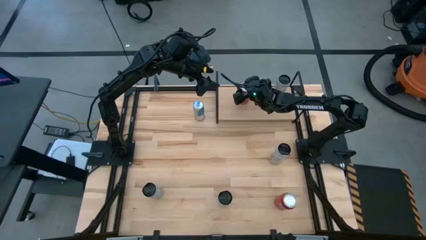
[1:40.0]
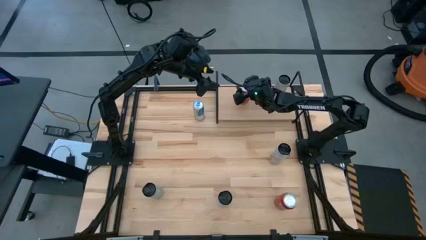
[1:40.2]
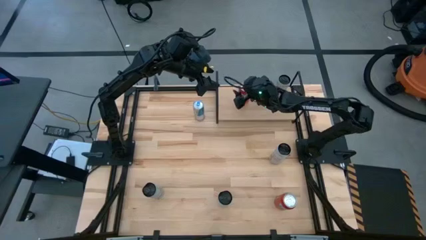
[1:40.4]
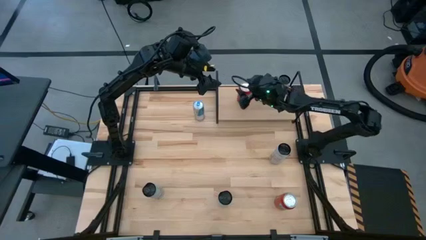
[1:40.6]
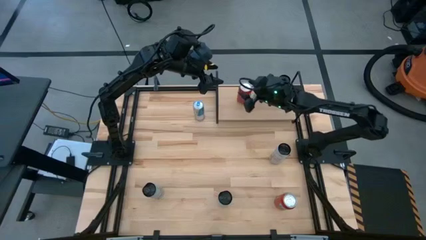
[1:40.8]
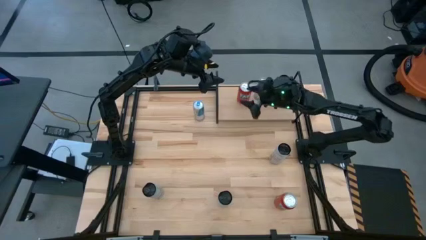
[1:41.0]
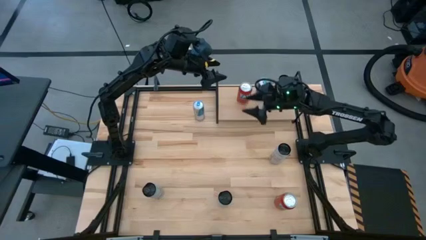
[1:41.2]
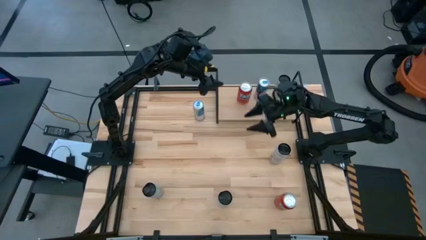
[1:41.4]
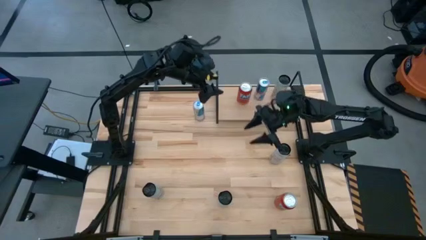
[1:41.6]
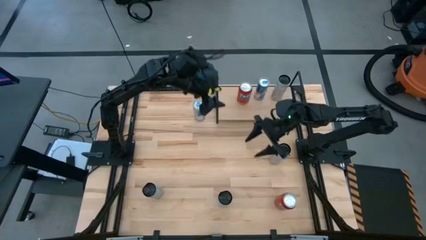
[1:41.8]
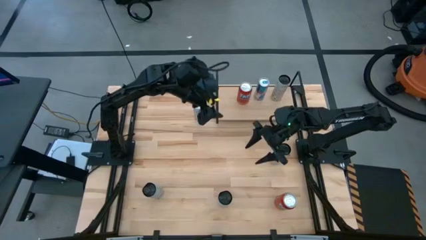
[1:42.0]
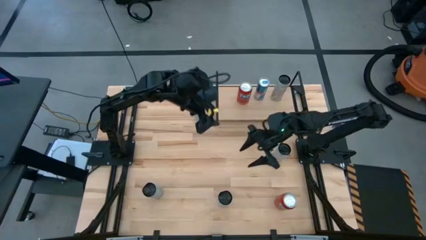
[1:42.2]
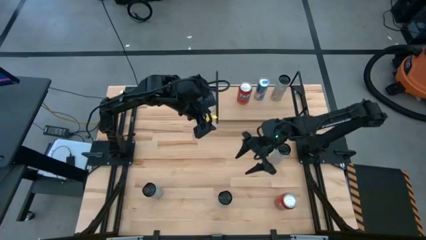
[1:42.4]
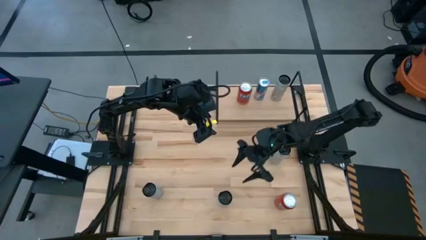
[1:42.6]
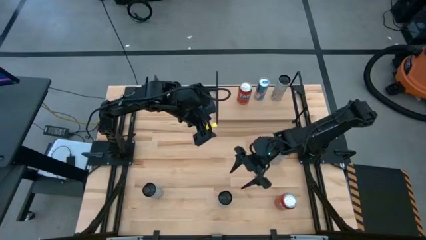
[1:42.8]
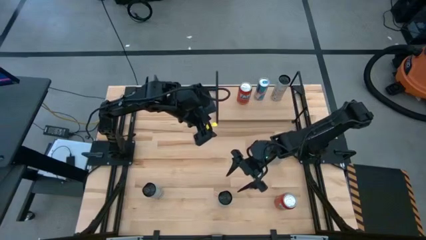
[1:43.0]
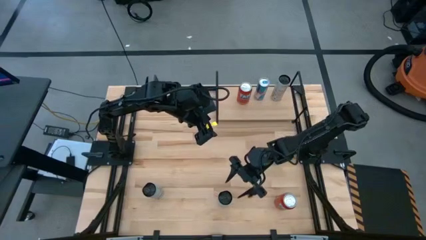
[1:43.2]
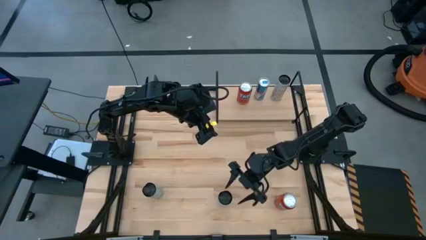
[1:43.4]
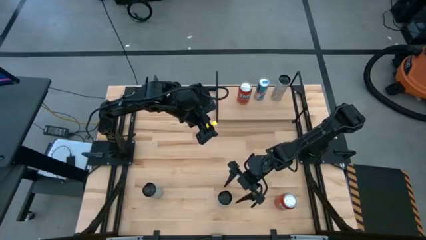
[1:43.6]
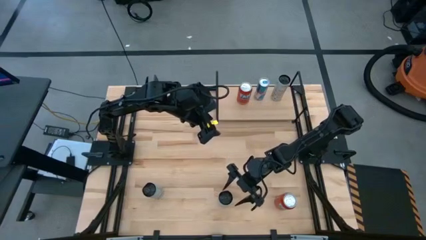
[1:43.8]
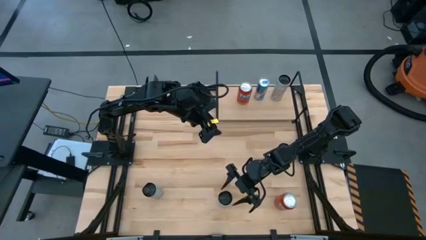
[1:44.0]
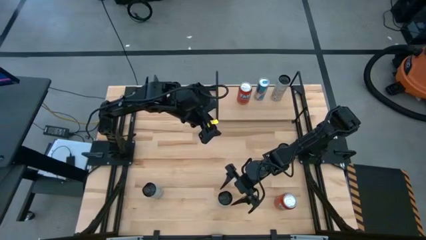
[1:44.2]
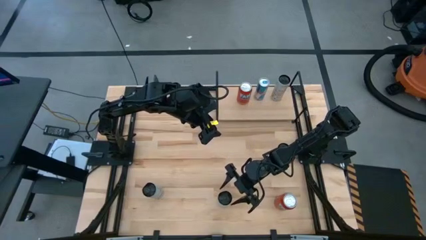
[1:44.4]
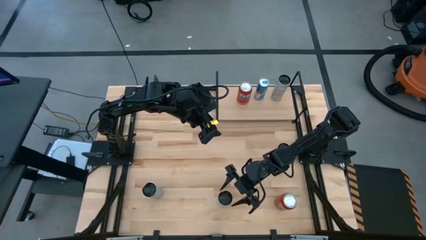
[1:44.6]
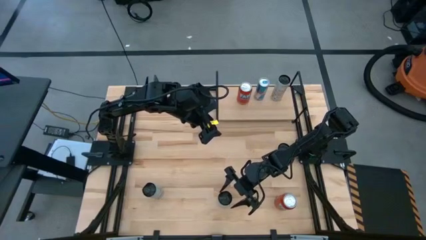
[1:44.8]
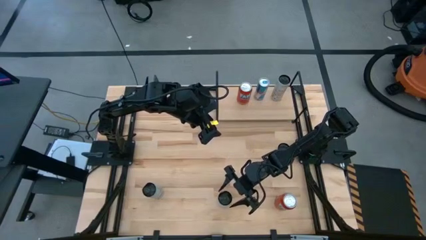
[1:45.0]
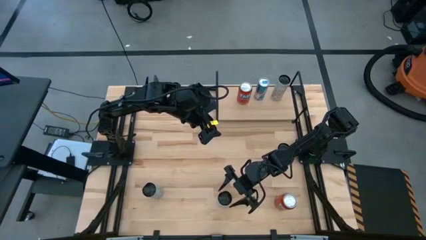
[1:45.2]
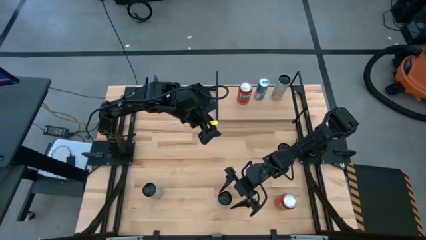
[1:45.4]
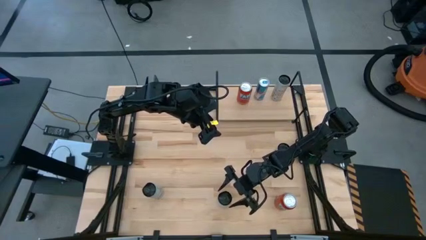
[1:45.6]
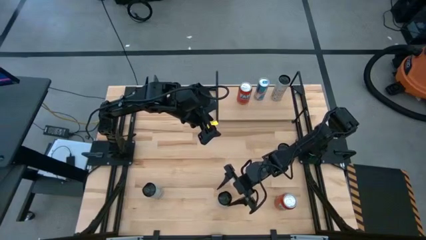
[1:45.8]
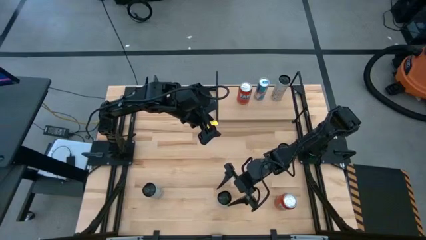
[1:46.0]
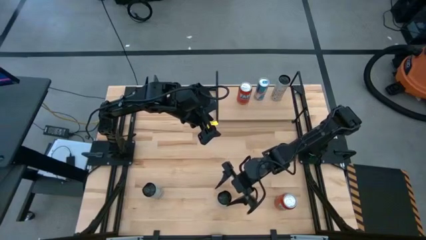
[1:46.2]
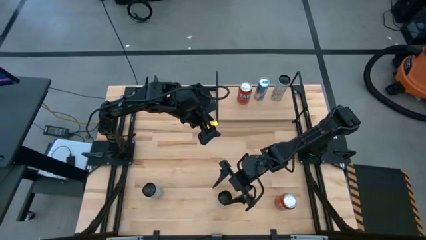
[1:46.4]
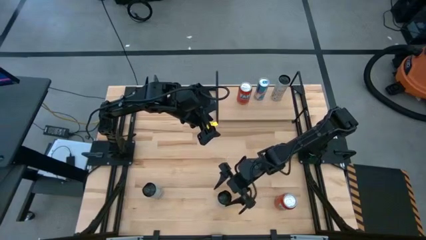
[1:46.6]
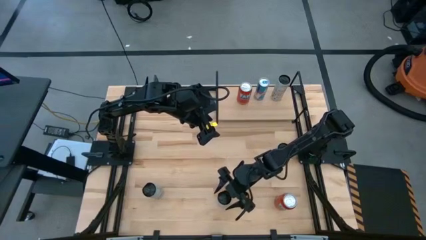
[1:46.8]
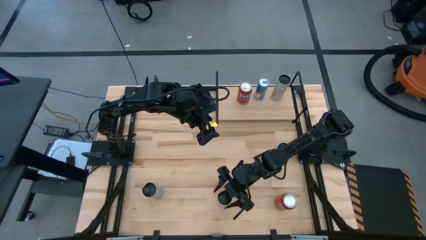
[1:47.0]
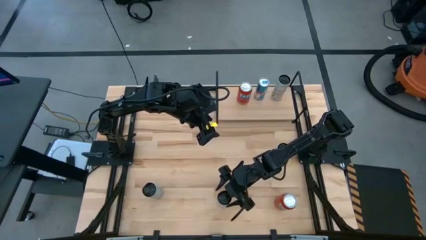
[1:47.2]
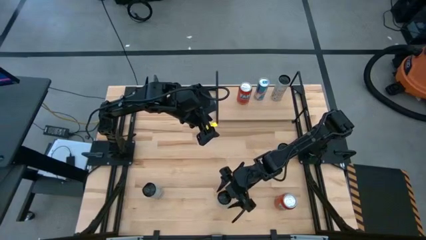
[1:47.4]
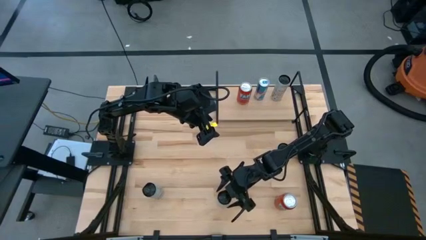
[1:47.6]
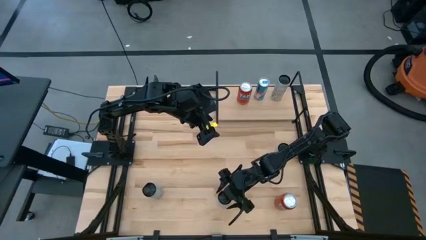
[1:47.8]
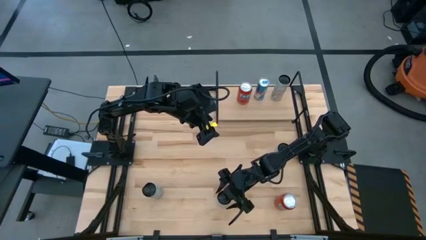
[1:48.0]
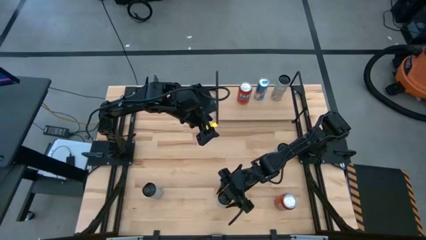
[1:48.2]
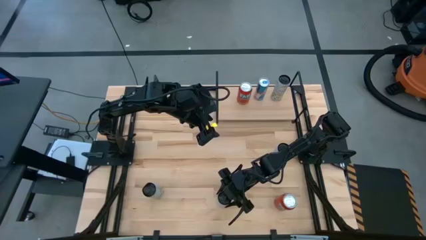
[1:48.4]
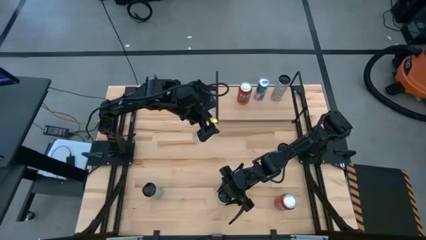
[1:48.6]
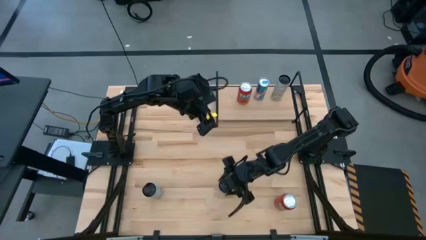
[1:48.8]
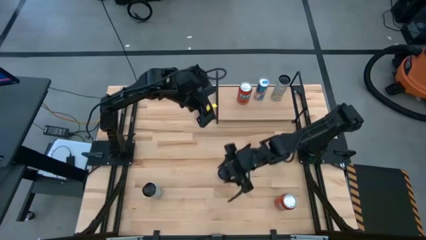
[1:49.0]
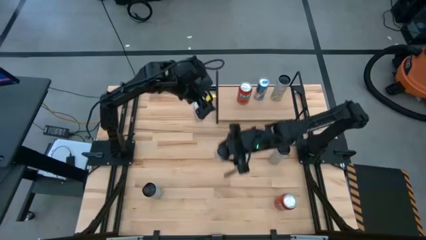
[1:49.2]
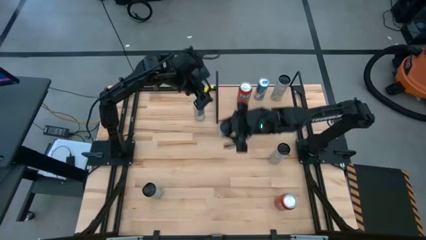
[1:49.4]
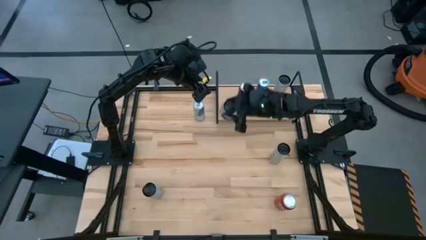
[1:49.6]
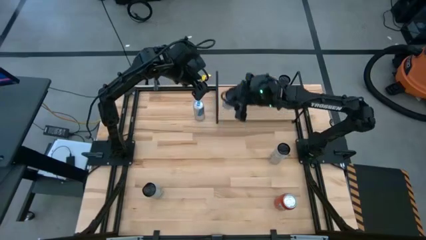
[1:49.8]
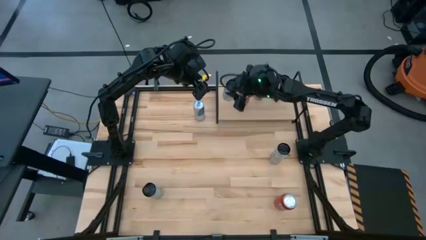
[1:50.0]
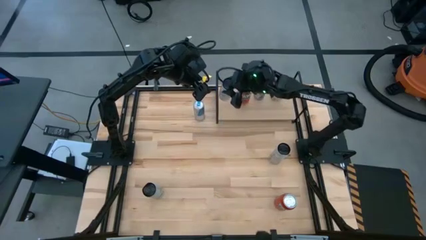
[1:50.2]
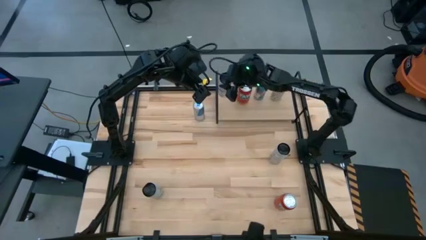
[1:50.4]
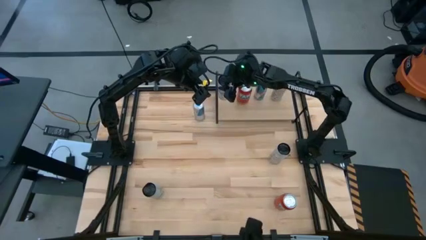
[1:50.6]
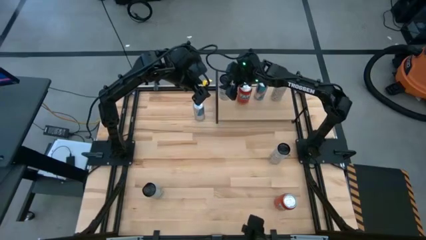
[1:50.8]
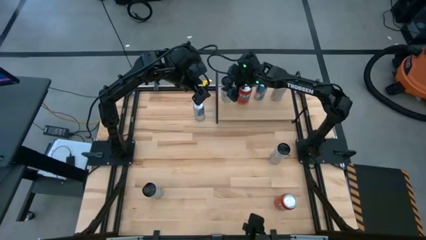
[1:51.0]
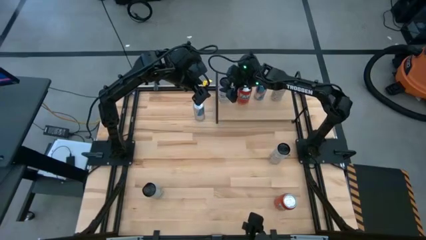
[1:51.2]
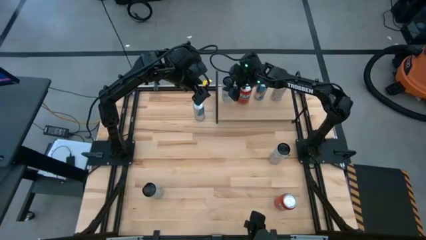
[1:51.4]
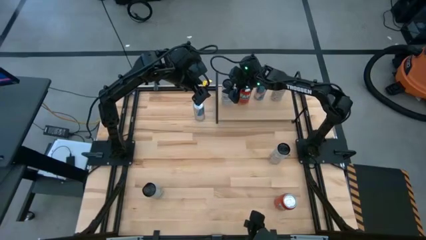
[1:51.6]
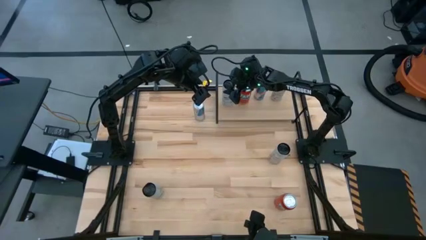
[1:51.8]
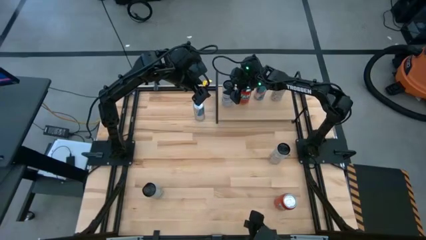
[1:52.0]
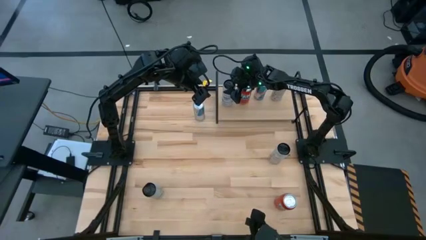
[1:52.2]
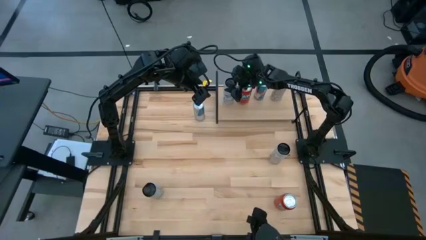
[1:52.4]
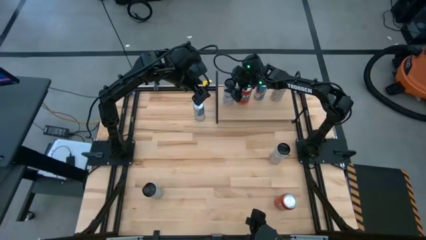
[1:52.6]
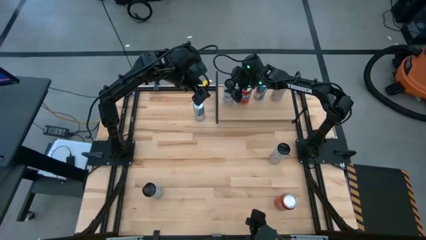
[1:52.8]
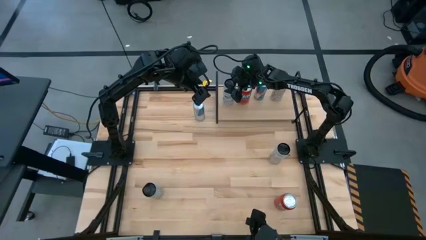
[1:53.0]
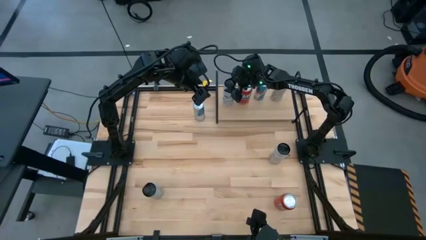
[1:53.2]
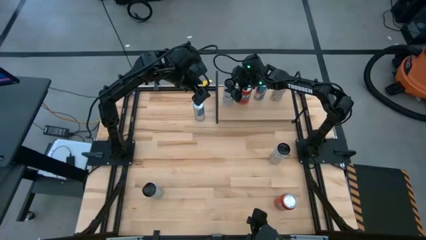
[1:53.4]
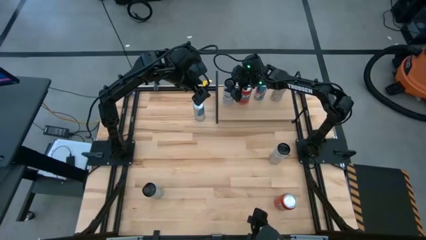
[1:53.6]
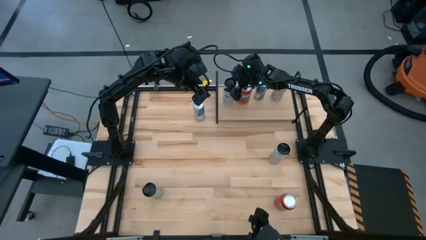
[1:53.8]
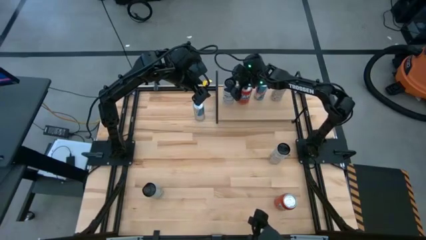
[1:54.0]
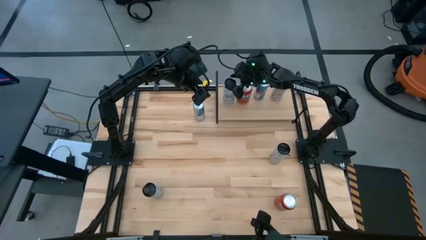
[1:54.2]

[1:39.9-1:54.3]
Task: Place canned beverage on shelf
Put the right white blue soda can on the shelf

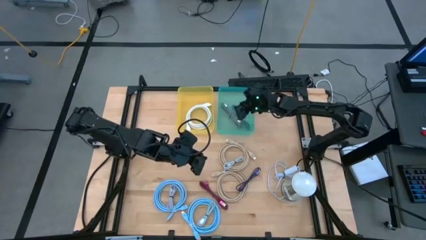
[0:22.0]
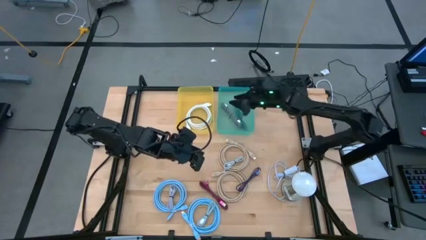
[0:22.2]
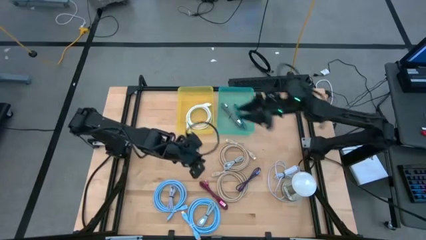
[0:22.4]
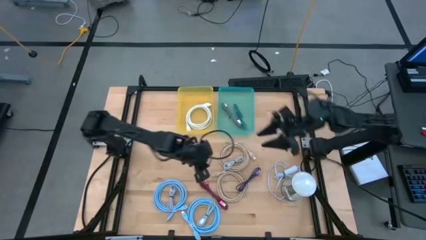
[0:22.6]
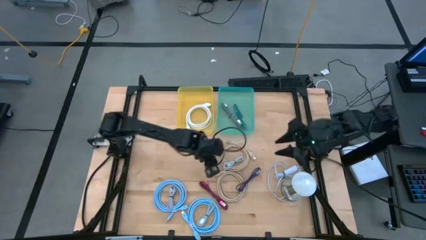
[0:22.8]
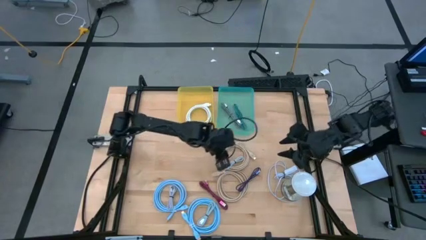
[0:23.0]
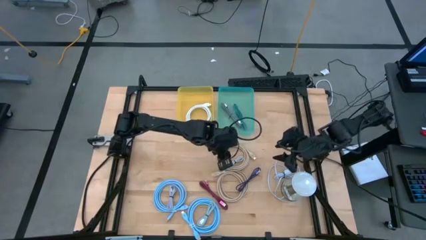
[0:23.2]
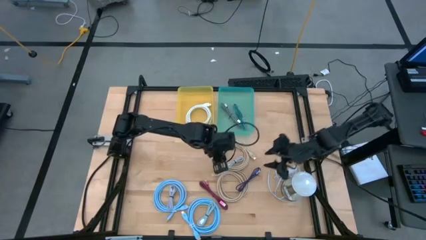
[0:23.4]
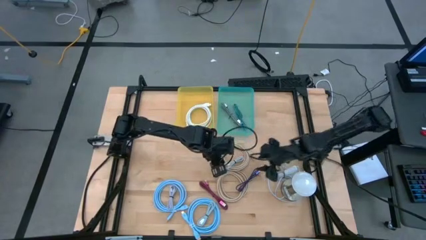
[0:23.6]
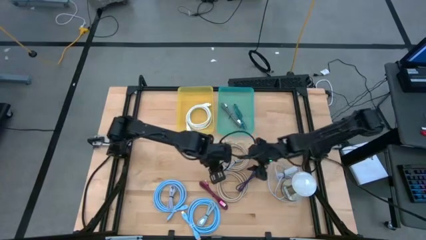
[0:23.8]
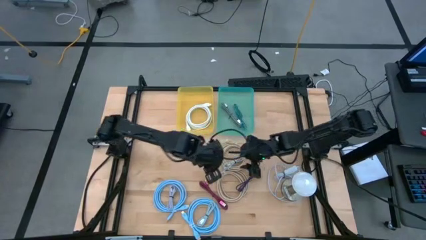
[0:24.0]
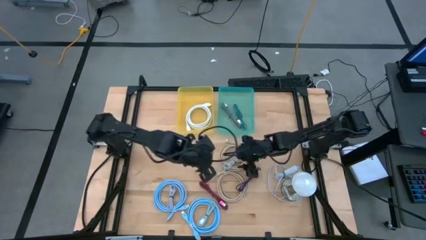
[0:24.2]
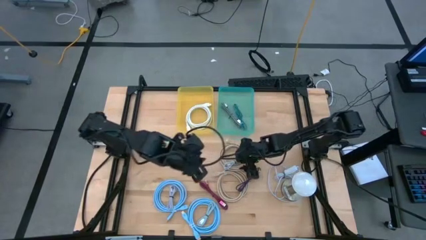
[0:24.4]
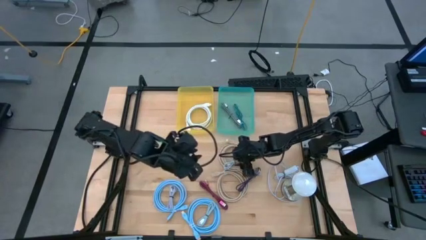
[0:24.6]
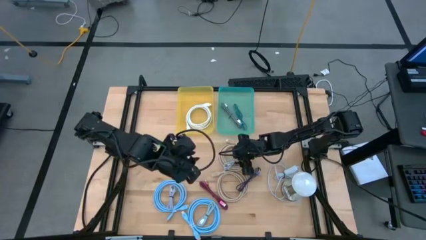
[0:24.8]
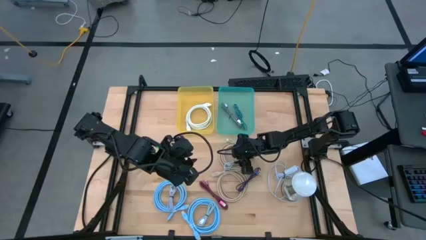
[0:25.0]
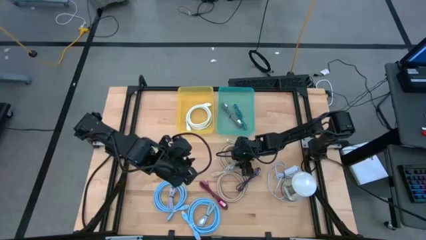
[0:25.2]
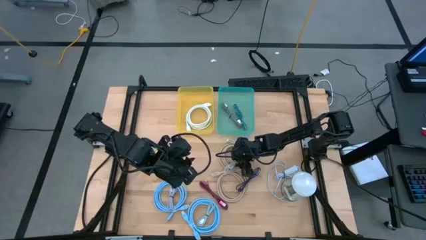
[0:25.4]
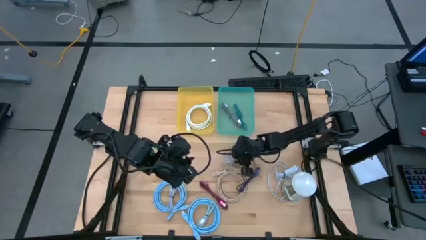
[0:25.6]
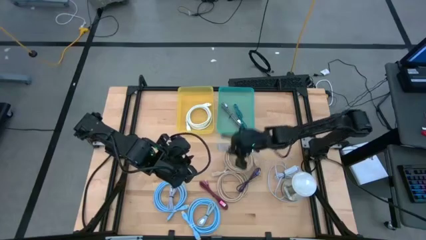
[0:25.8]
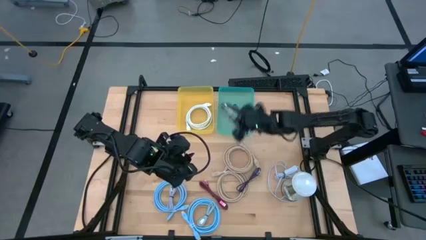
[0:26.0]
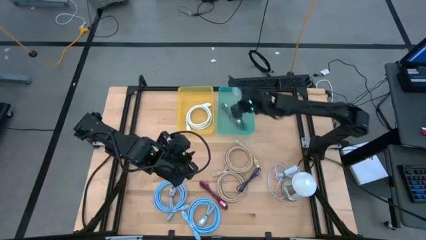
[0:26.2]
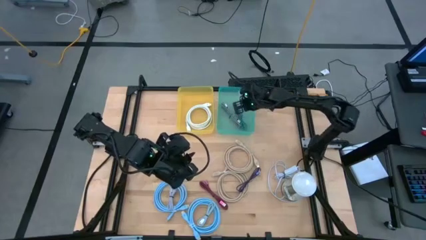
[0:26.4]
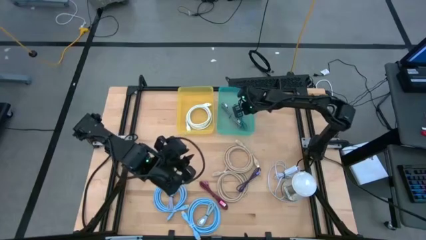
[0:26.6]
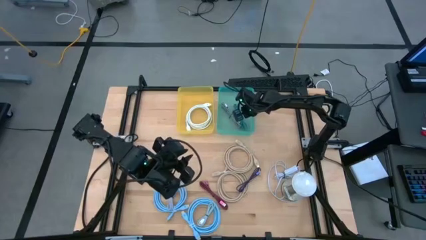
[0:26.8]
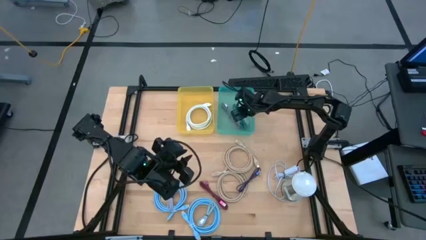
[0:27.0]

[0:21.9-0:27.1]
Task: Pick and place USB-C Cables
Put the small white charger cable into the yellow bin
